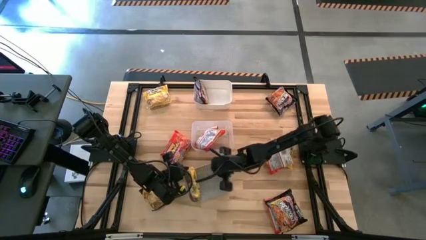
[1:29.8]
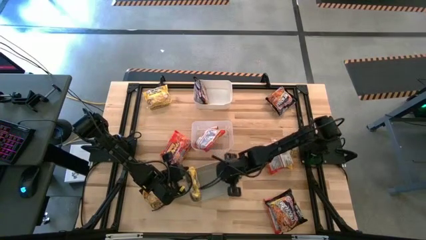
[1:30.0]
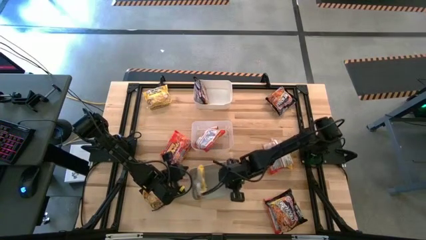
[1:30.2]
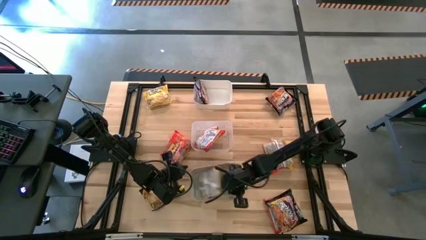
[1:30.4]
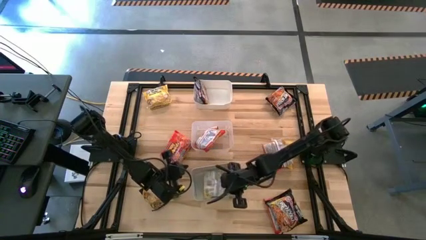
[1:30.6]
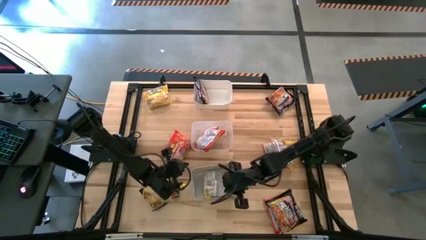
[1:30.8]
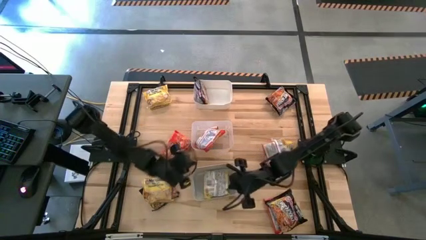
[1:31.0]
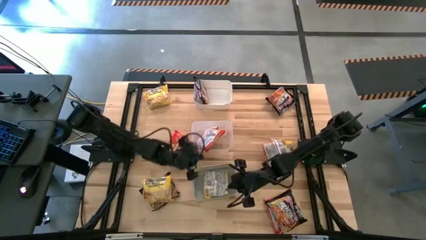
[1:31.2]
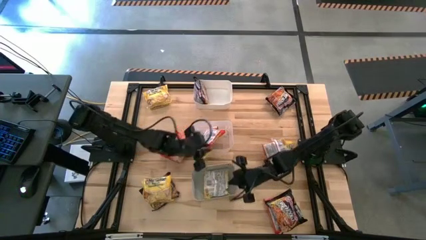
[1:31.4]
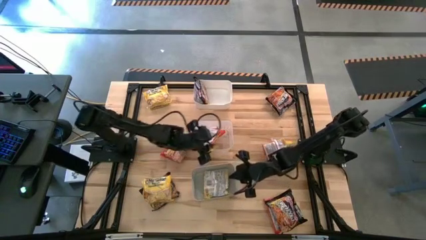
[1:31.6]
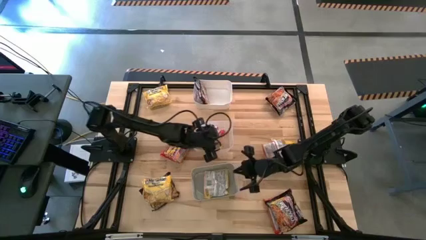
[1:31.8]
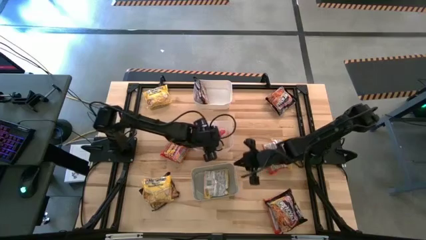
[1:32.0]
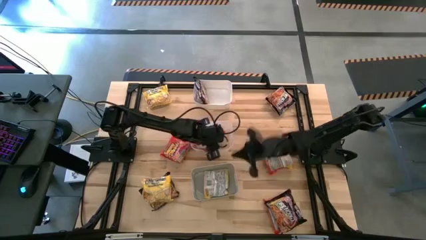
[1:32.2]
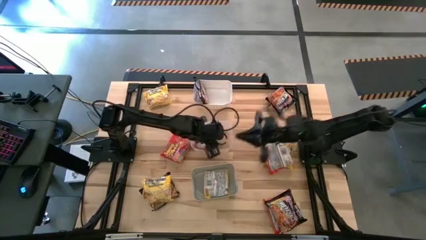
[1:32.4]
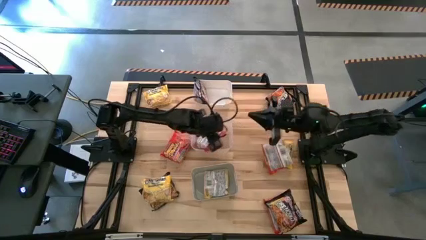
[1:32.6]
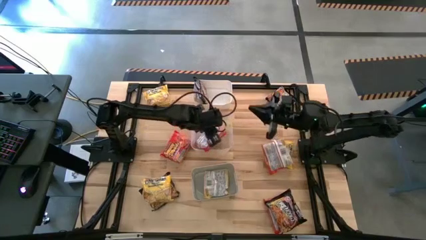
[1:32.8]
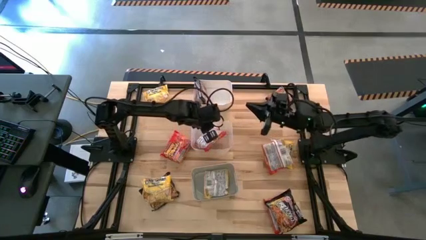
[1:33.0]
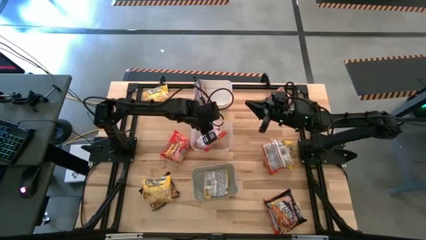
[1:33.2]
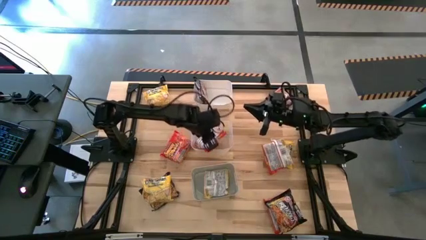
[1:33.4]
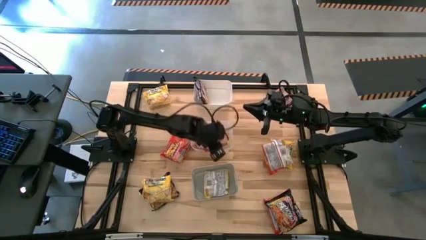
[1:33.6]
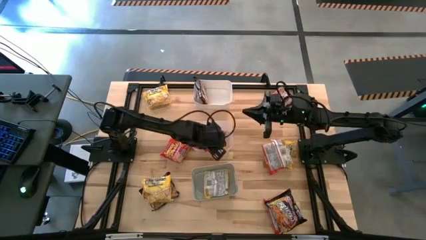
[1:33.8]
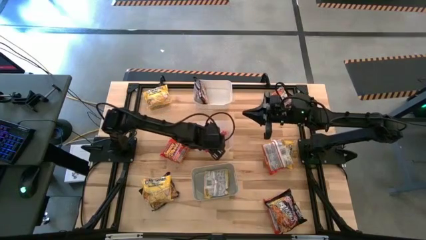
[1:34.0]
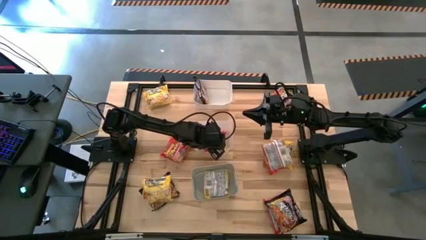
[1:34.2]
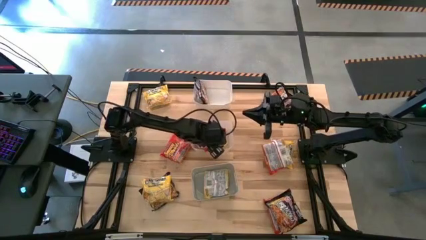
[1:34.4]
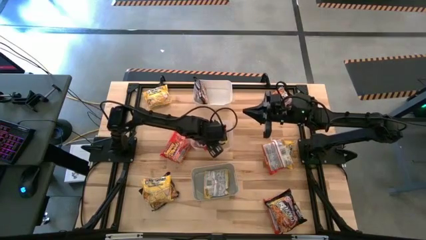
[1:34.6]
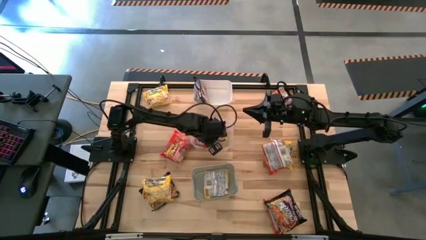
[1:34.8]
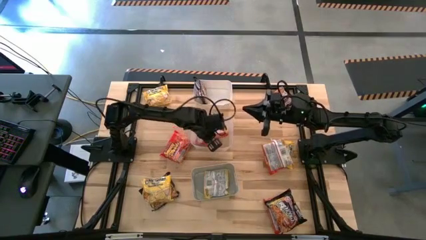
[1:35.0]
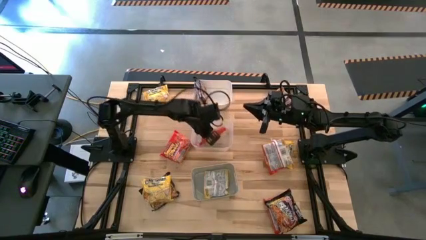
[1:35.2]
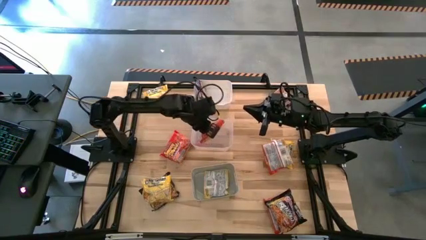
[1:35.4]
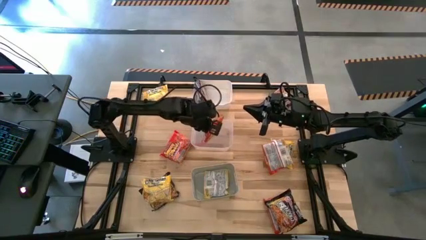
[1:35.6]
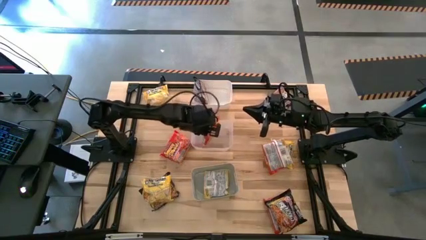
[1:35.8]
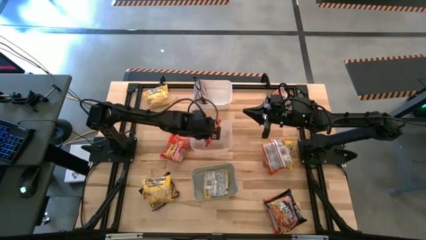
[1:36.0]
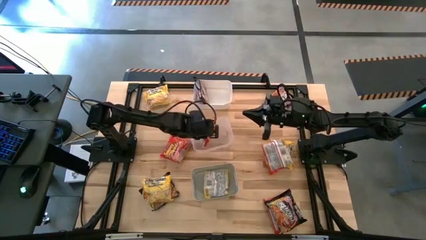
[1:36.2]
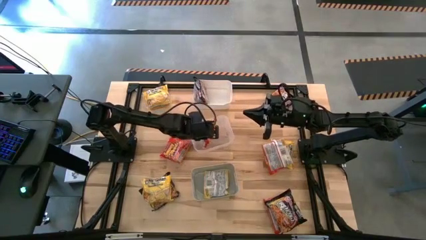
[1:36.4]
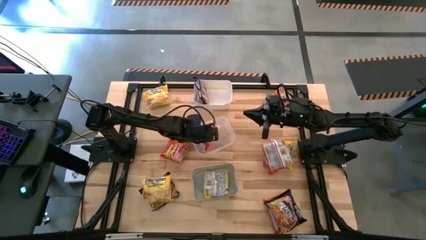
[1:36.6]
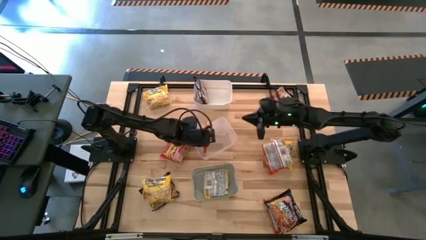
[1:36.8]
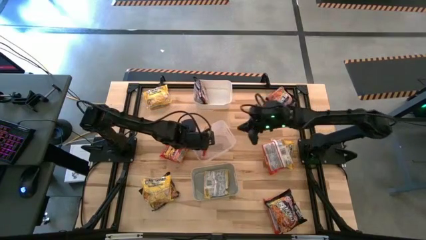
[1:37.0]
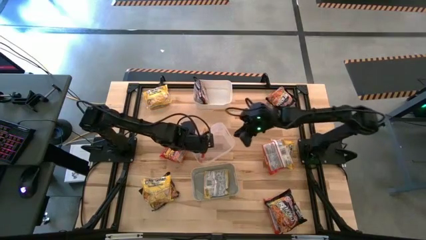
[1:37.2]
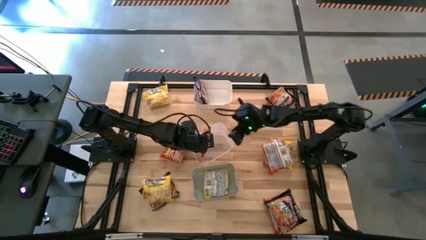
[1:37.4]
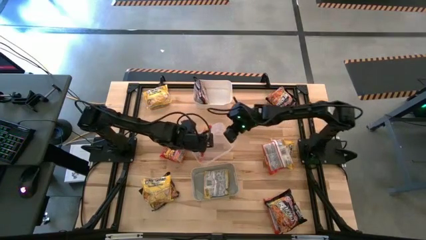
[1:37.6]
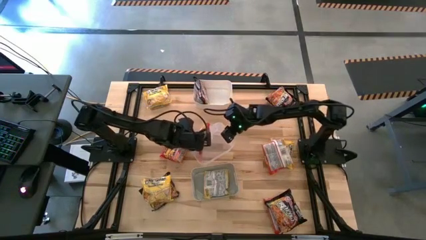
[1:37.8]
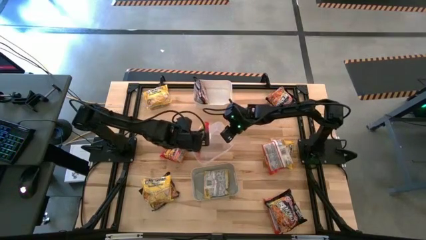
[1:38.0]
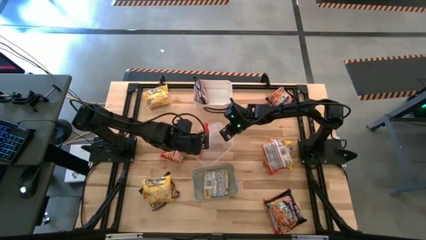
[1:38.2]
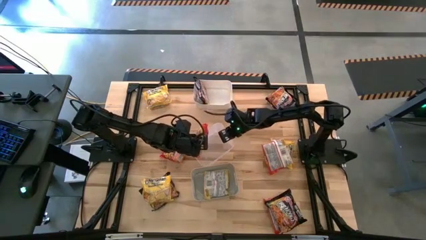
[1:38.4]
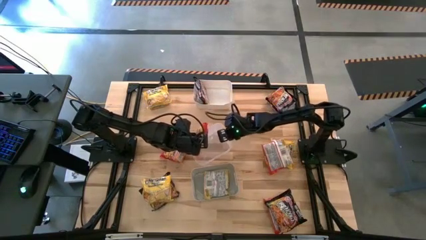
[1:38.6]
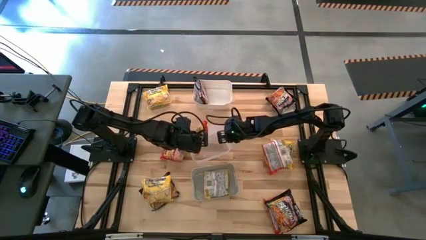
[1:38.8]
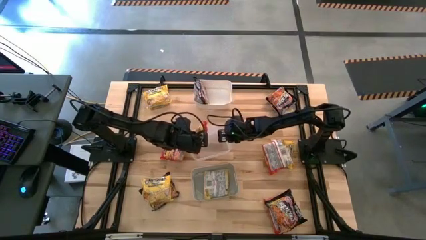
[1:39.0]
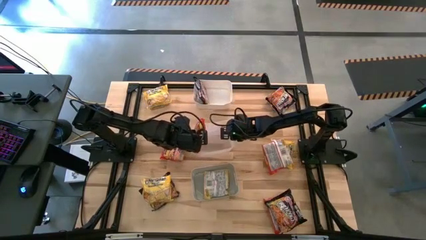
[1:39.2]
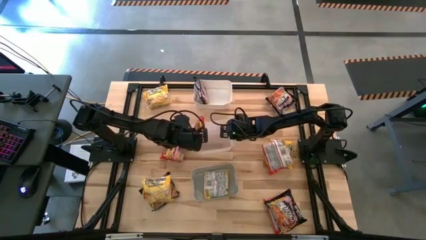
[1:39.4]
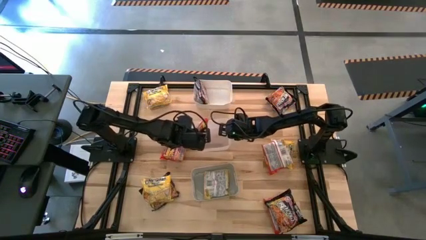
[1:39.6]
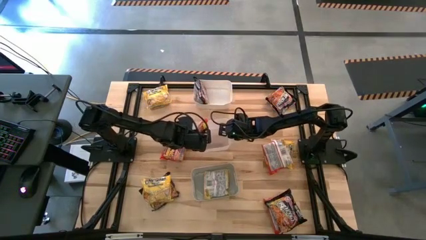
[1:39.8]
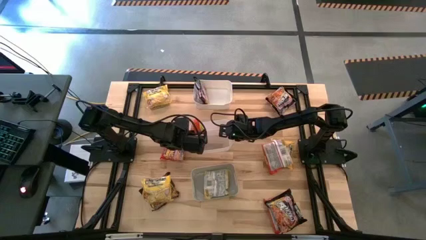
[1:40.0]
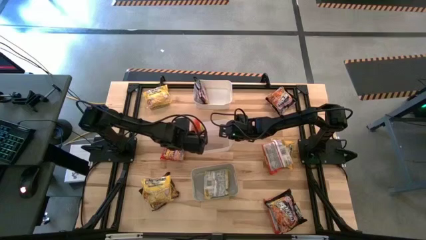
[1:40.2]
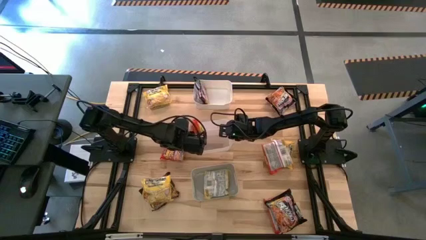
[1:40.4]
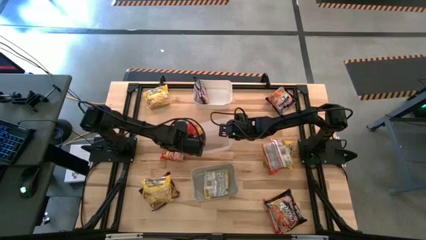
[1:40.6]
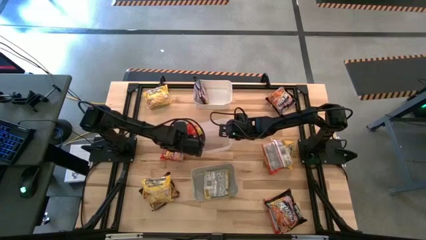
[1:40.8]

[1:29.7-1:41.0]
Task: Sort Maruchan noodles
Adjust the orange noodle pack into the transparent bin

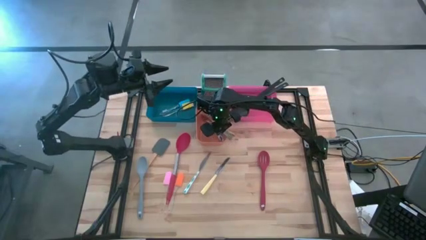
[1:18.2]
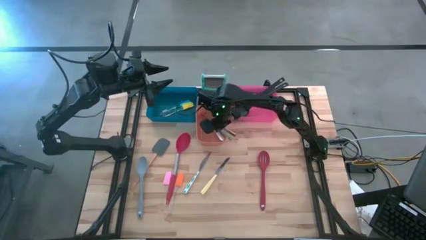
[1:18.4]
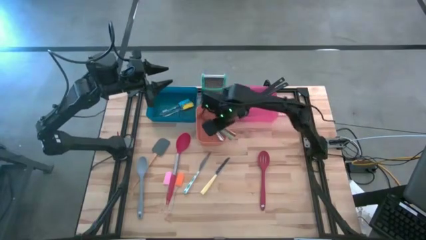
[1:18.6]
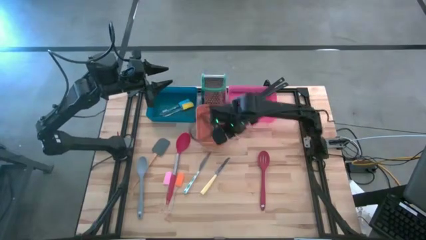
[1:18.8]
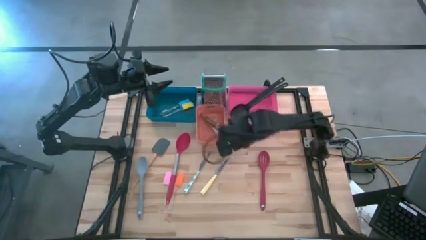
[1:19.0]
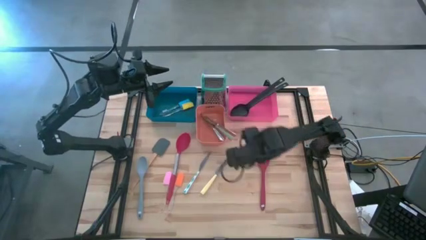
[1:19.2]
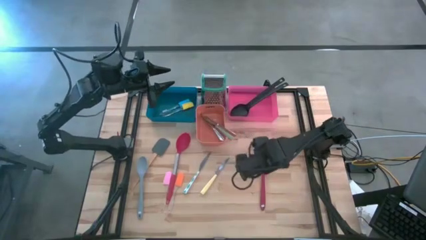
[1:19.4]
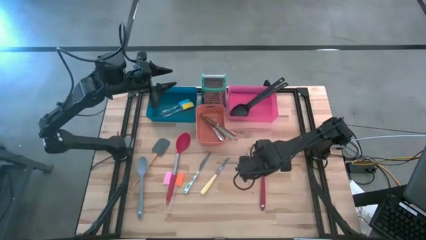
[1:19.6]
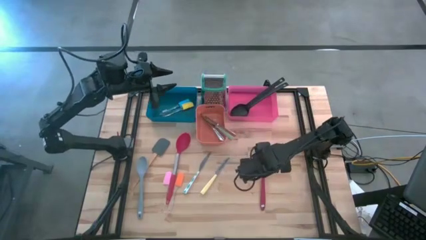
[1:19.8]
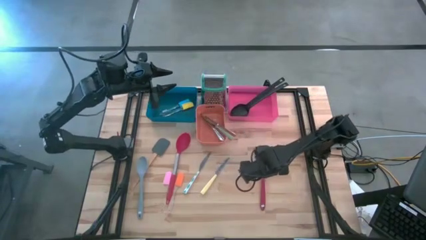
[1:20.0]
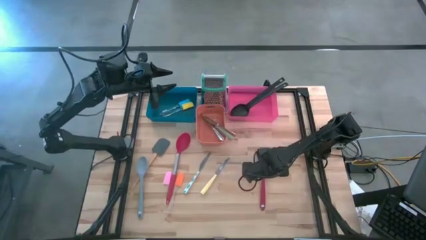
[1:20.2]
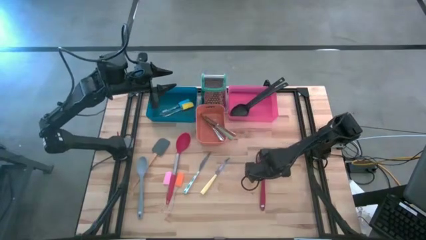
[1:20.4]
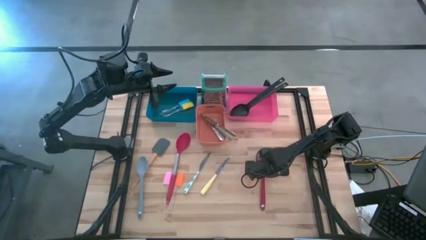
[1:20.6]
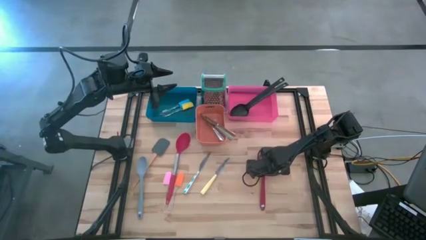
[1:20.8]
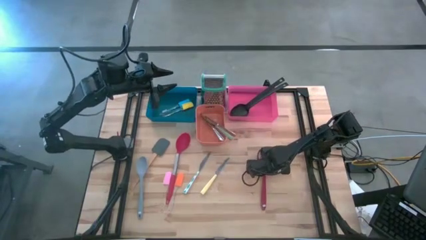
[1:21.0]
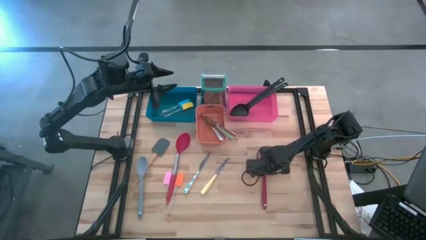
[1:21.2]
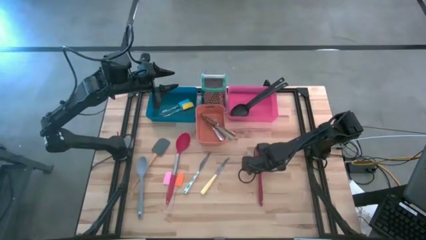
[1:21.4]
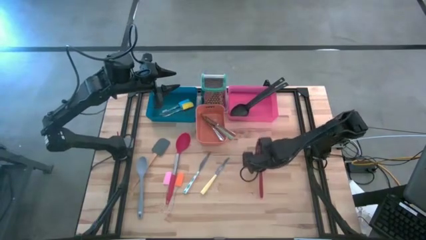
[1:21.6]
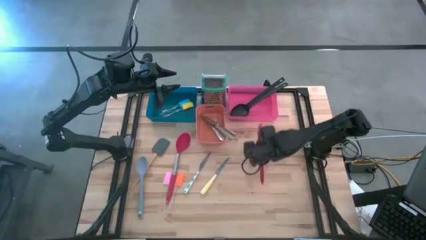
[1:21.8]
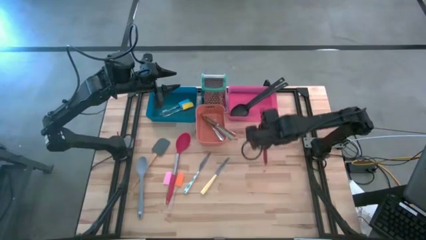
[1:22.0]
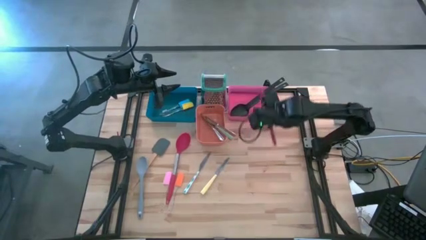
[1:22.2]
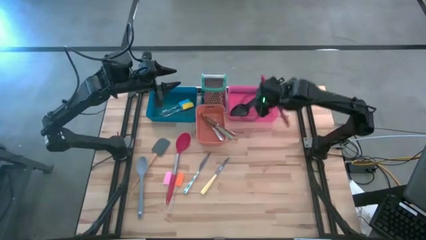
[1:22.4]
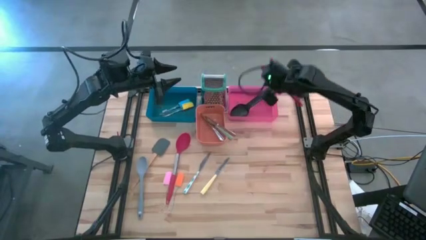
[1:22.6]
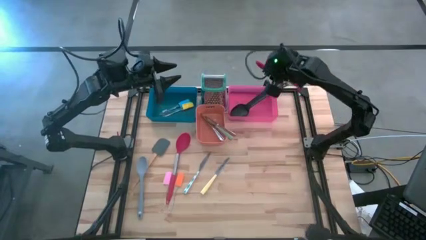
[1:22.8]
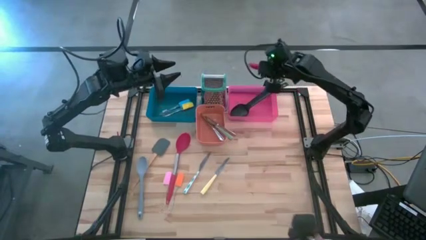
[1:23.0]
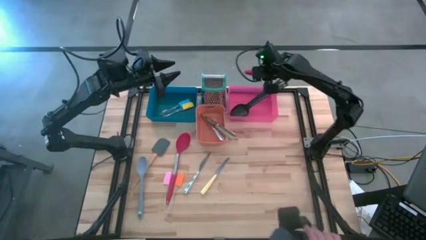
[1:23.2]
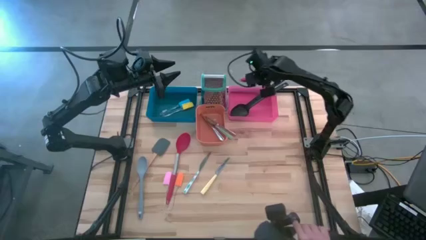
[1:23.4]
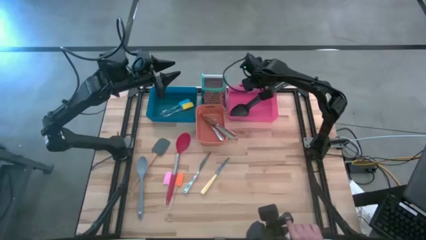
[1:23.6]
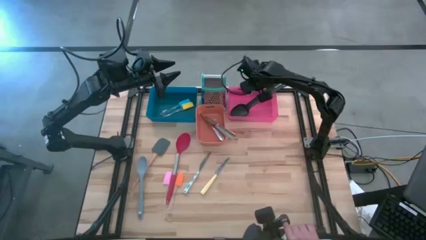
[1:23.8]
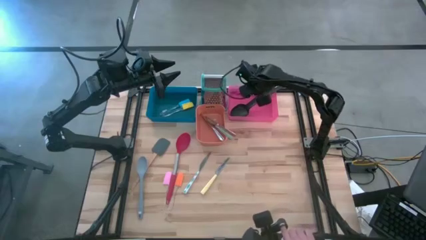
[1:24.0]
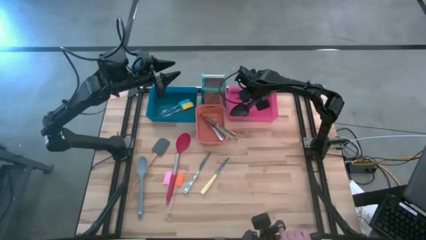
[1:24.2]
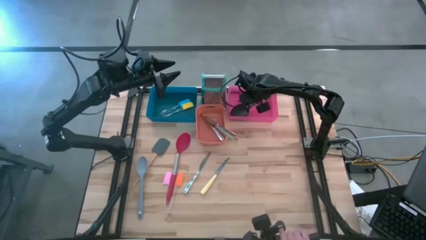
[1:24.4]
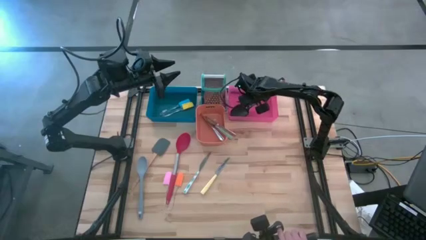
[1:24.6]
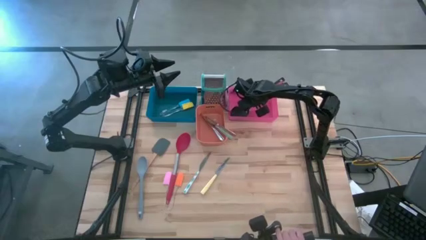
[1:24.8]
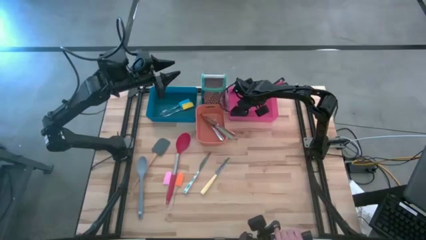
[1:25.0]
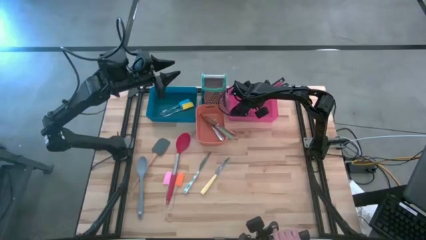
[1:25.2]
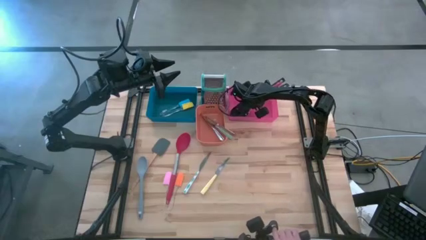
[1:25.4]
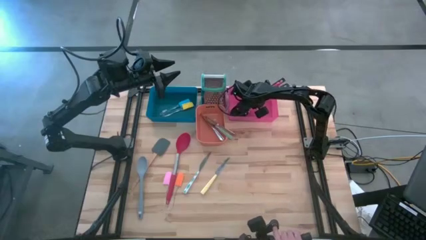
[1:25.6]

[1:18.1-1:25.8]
Task: Pick & Place Kitchen Items
Put the red slotted serving spoon into the pink bin
